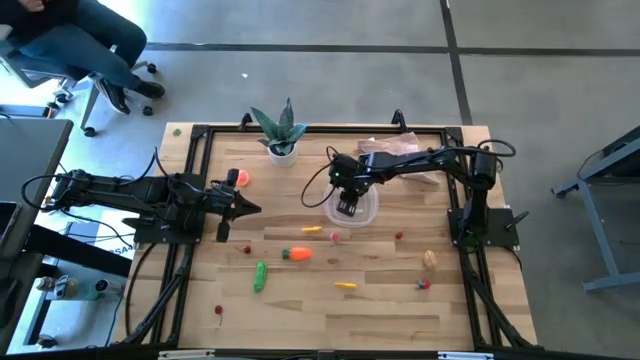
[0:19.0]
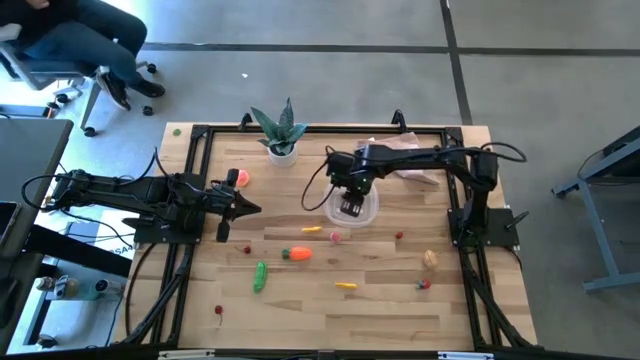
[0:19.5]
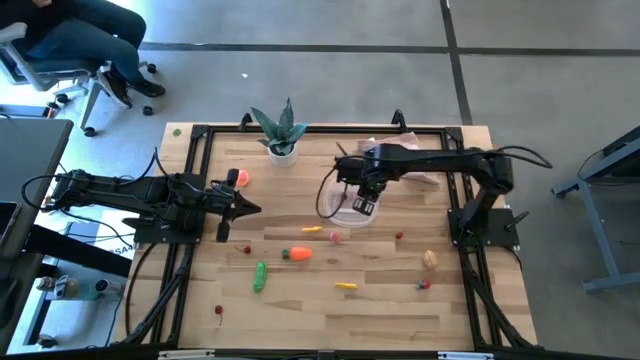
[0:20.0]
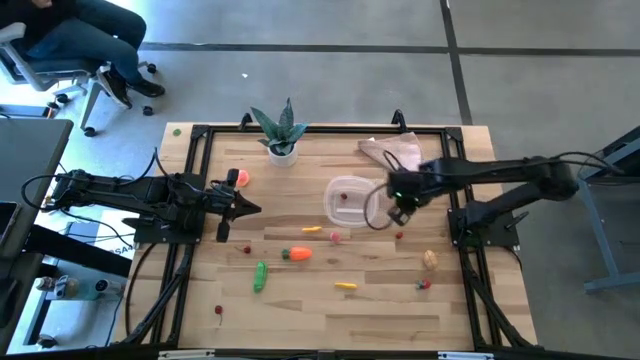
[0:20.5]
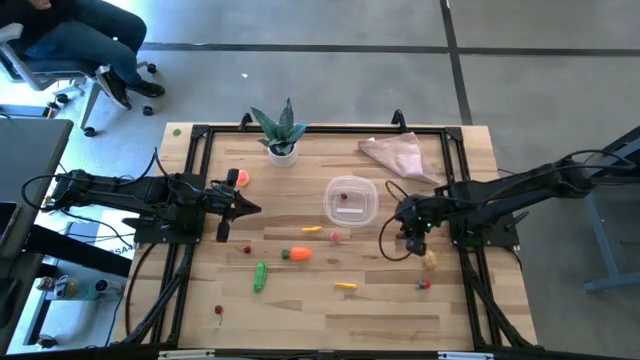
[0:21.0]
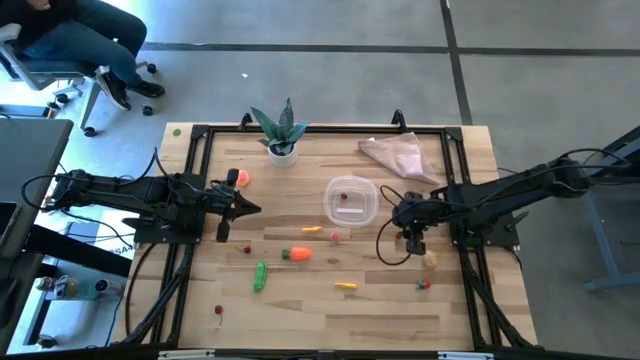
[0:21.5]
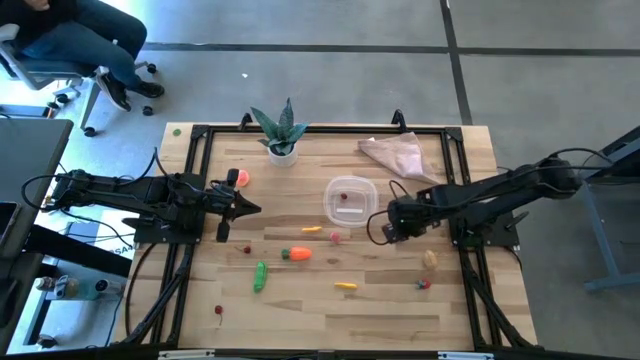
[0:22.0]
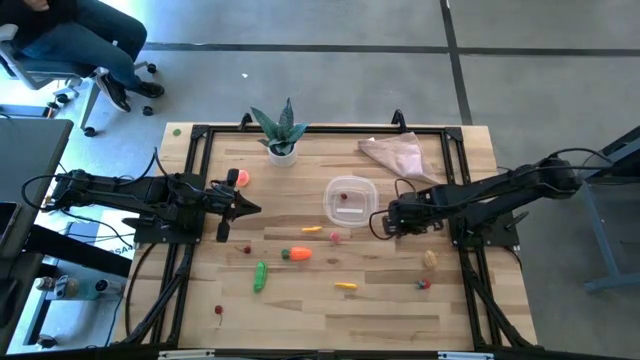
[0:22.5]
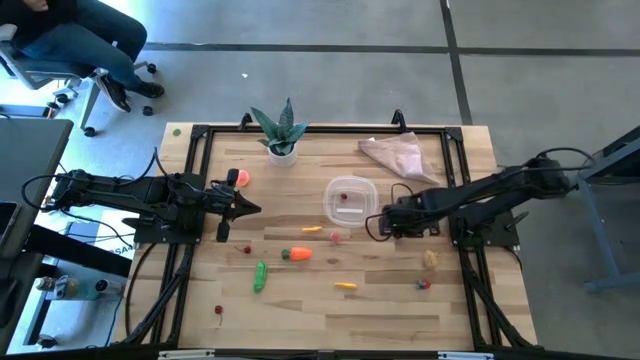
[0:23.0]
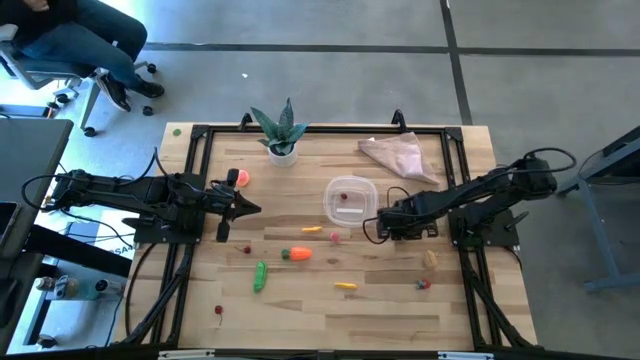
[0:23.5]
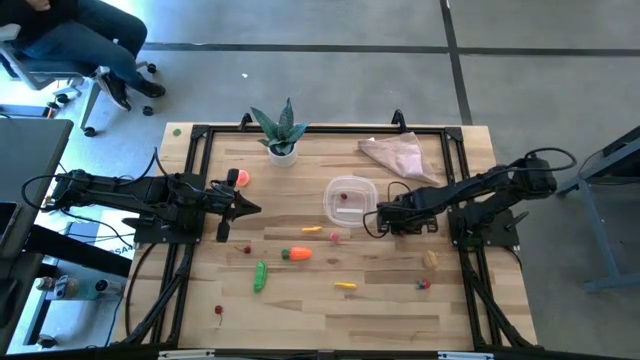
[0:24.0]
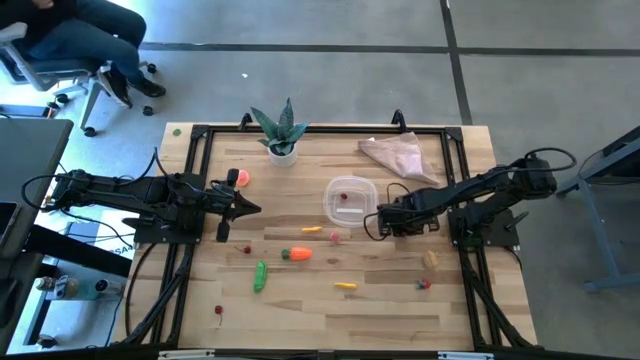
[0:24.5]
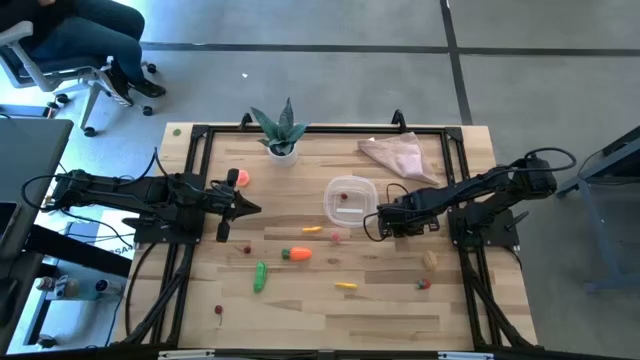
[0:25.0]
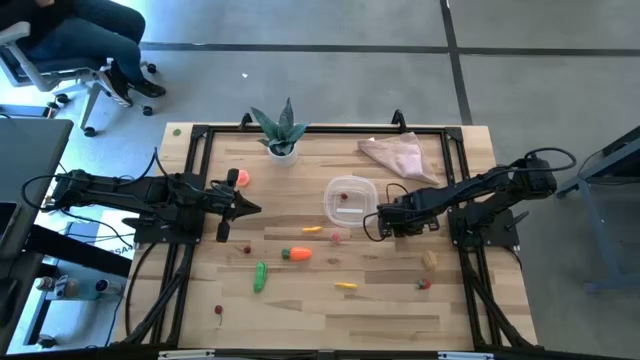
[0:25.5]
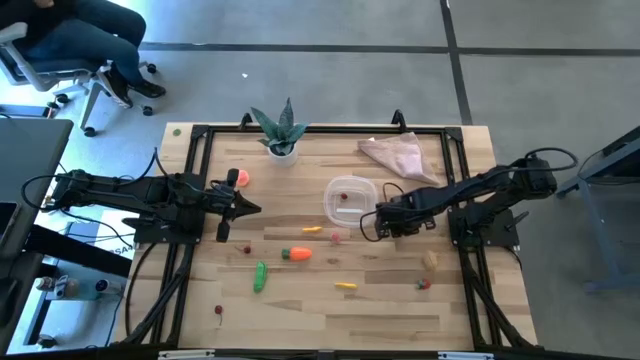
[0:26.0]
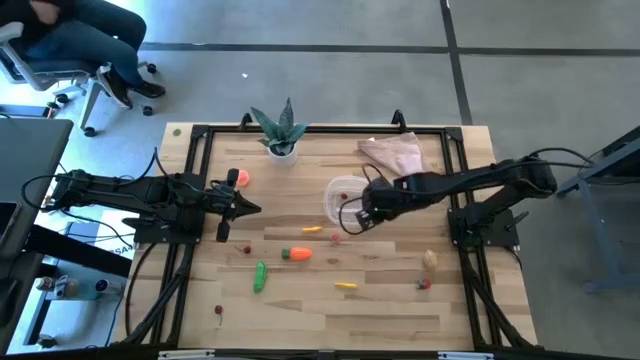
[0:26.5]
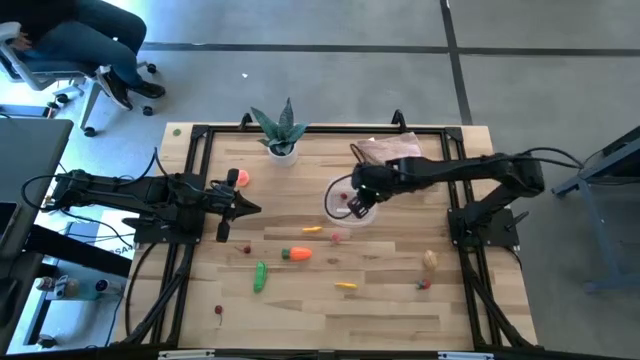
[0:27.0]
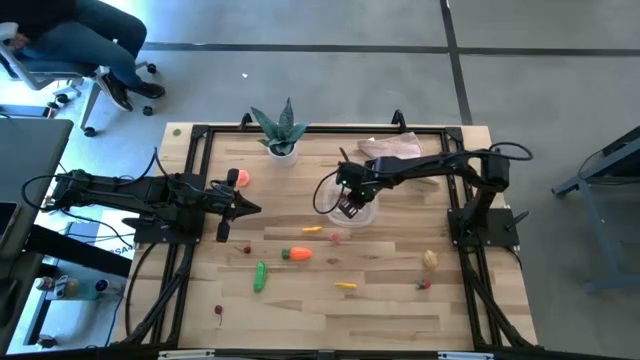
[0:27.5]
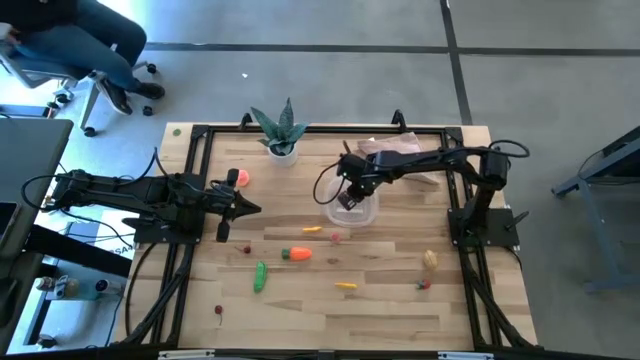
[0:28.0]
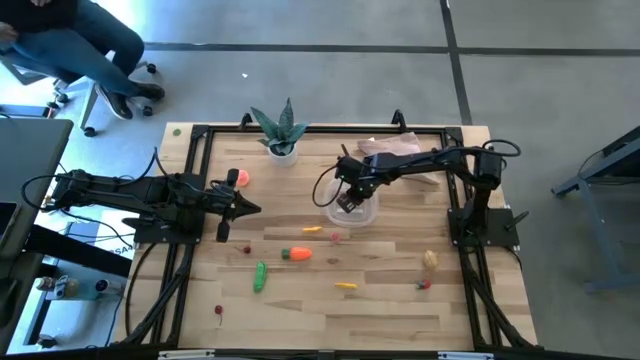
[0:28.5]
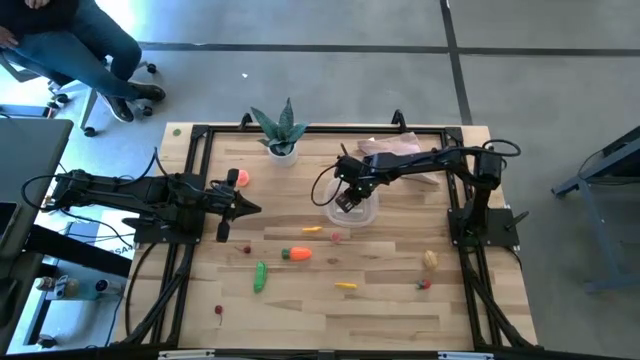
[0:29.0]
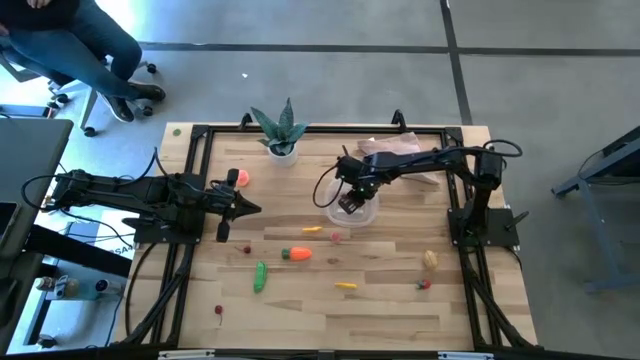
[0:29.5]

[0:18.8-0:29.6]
Task: Pick and placing Produce into tupperware
Put the red cherry into the transparent bin

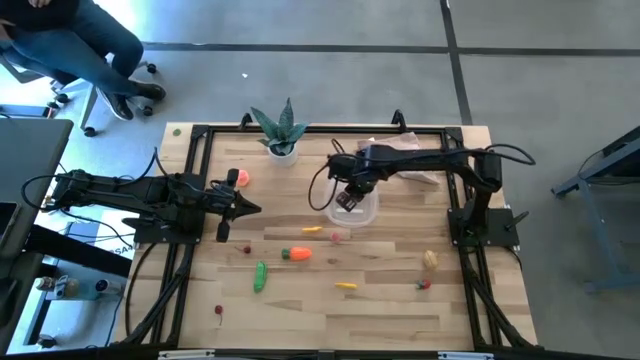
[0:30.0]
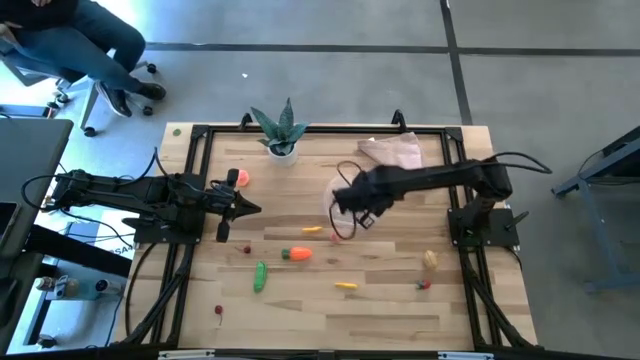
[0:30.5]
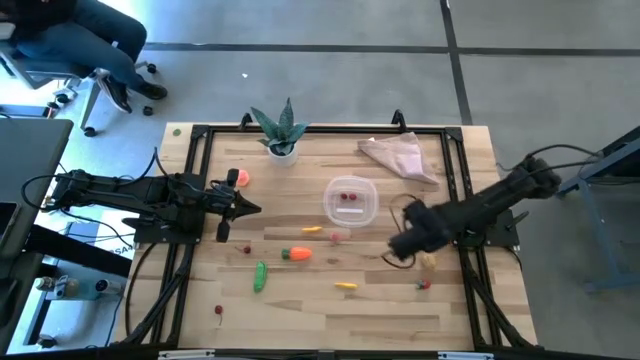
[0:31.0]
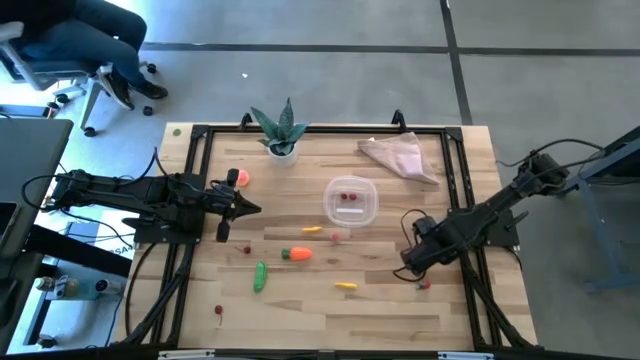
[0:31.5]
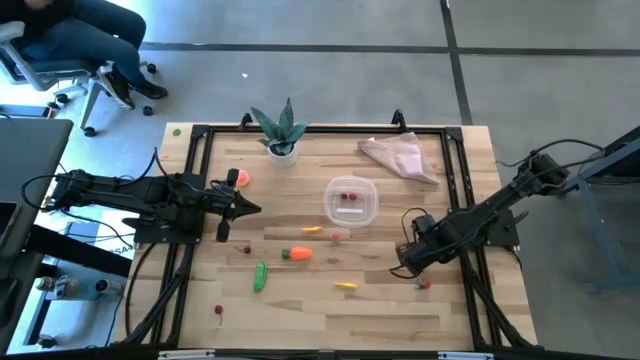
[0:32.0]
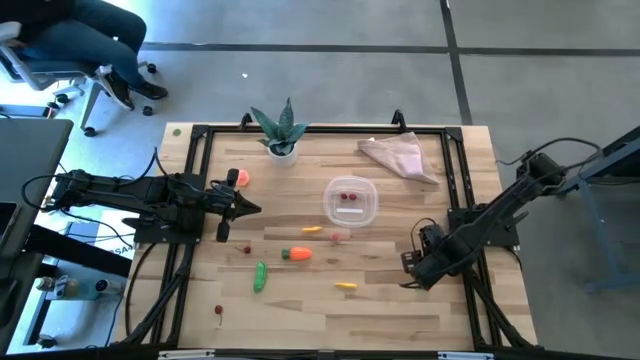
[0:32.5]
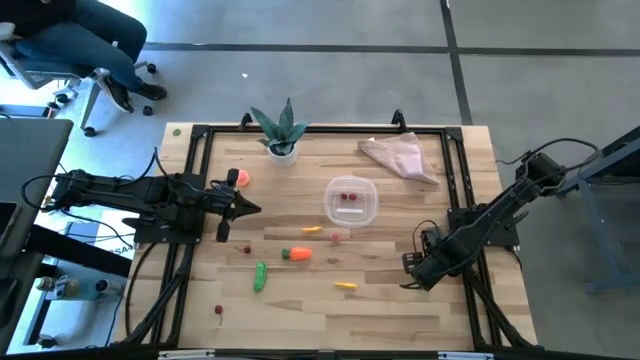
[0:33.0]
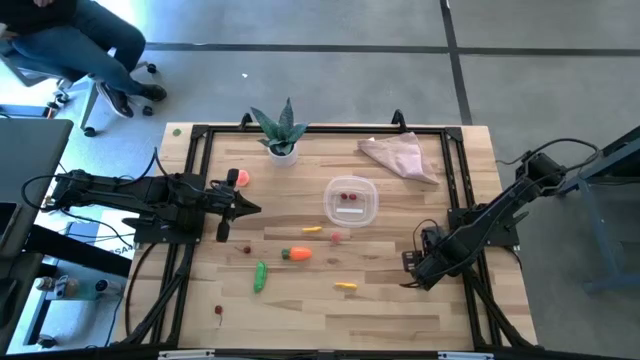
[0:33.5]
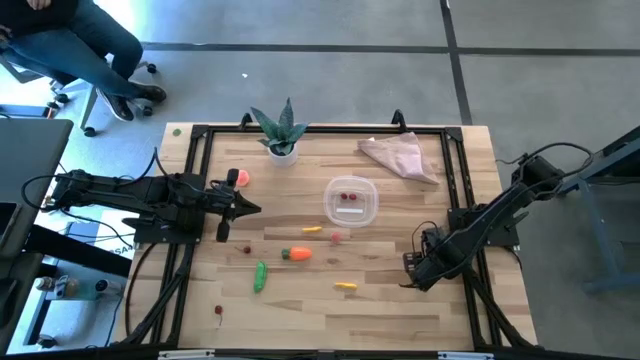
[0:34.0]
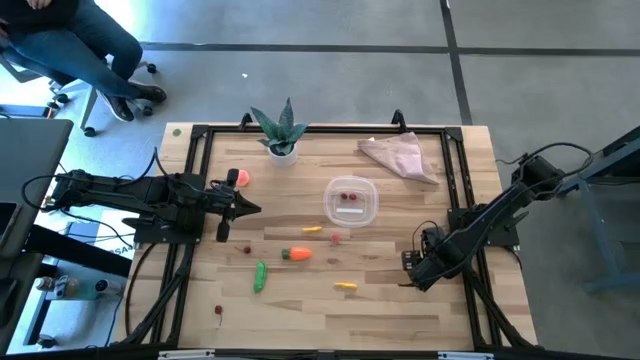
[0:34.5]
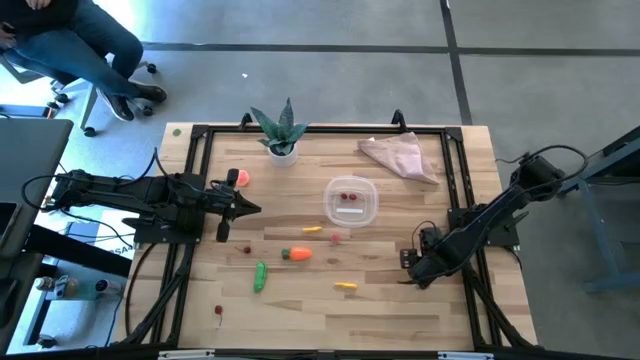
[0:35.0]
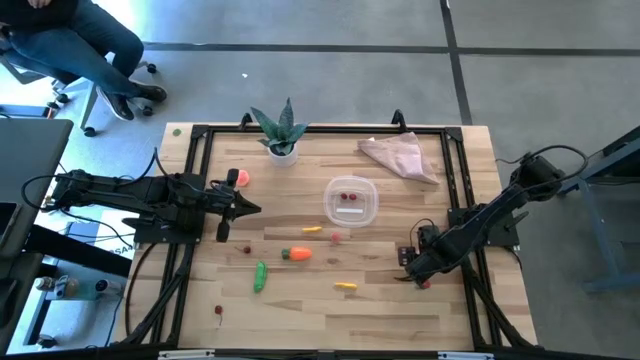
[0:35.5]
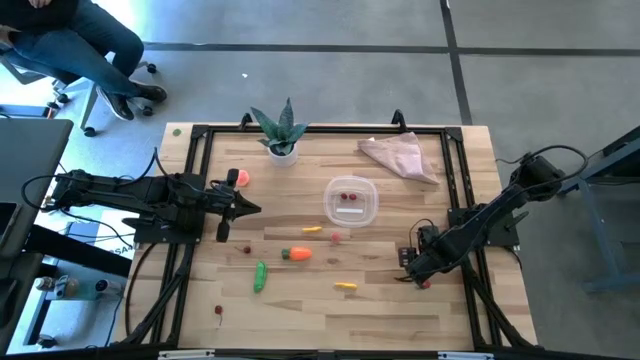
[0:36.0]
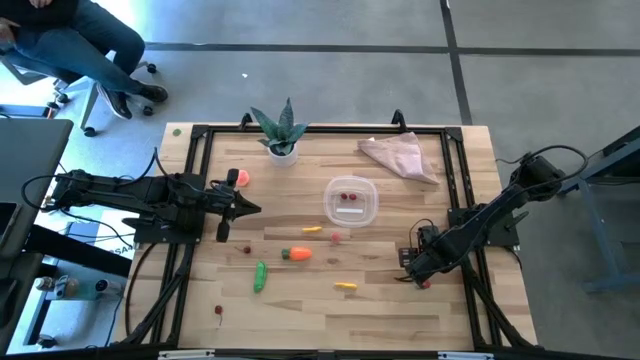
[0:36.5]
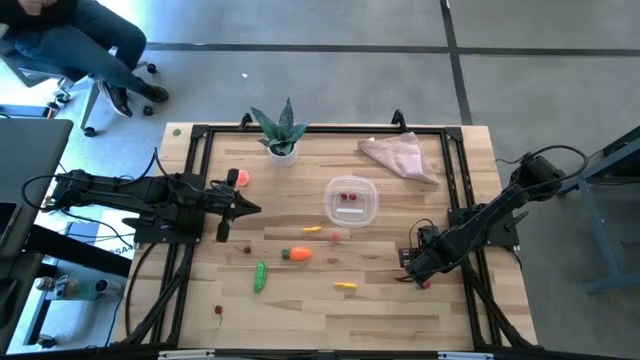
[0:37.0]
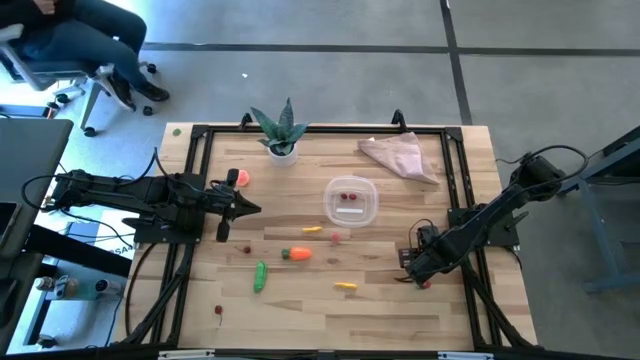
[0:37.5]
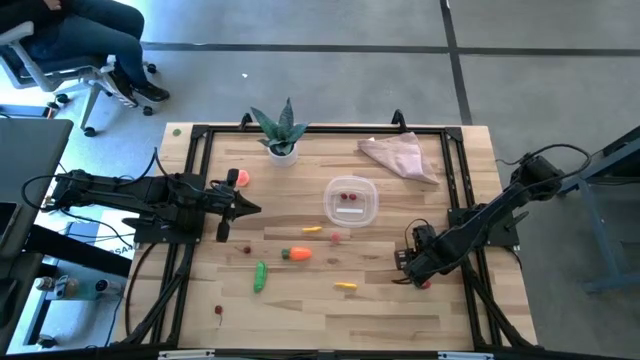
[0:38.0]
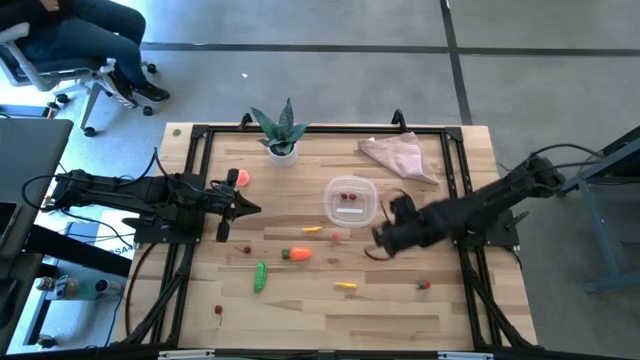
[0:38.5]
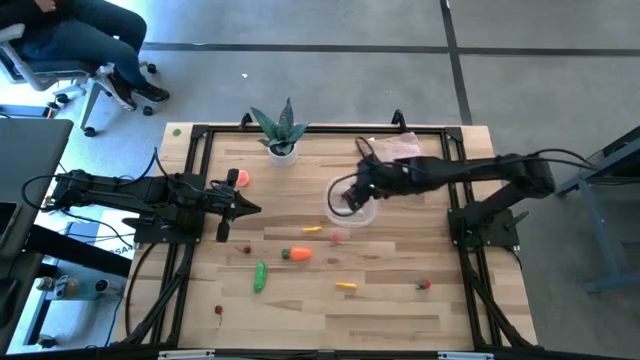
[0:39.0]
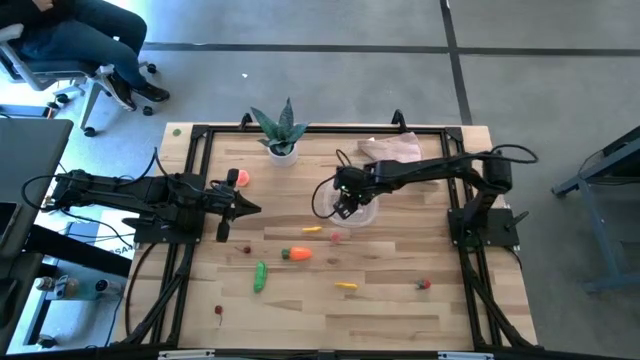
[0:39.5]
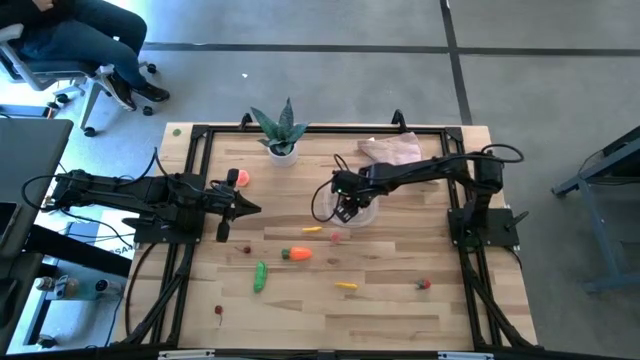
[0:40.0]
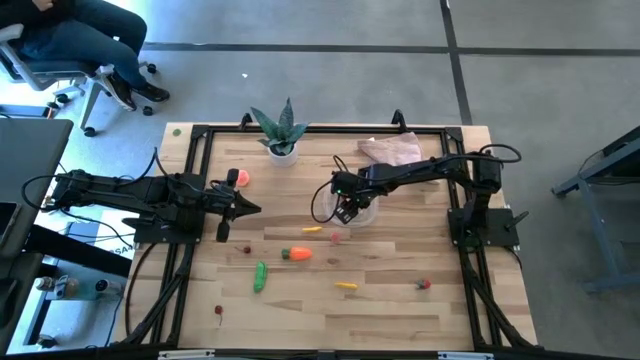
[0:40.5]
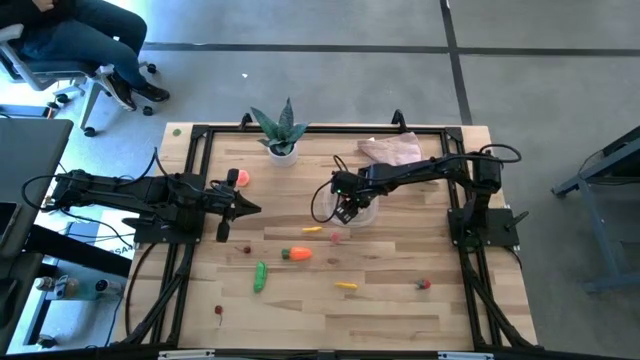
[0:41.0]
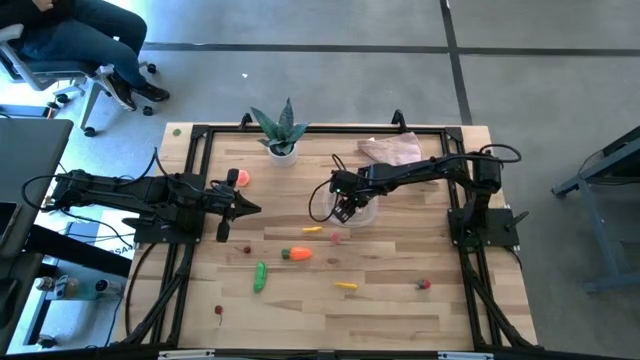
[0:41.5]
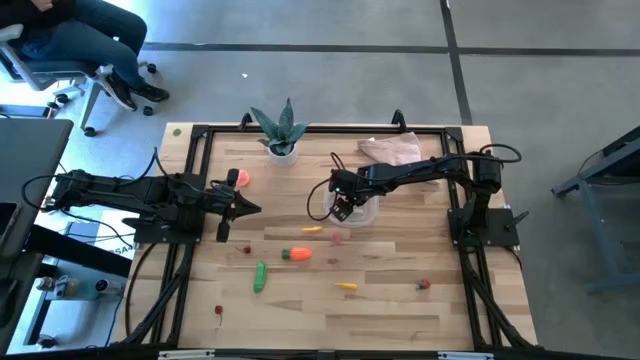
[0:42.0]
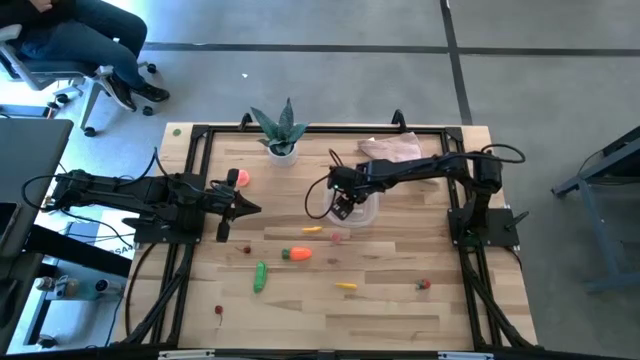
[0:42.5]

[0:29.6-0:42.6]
Put the brown potato into the transparent bin
